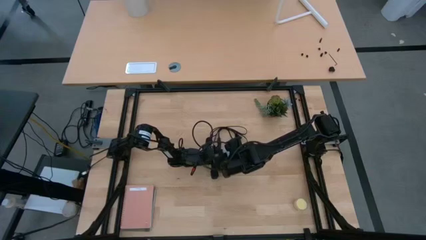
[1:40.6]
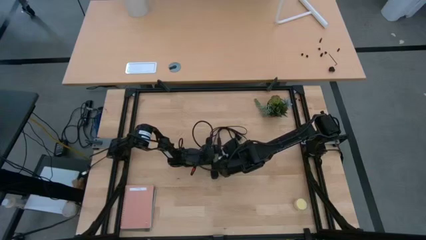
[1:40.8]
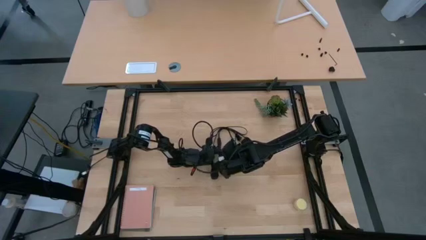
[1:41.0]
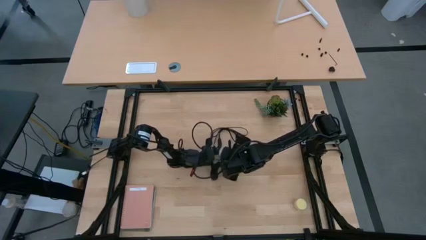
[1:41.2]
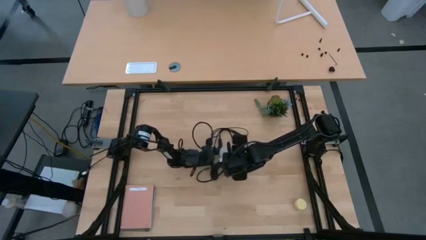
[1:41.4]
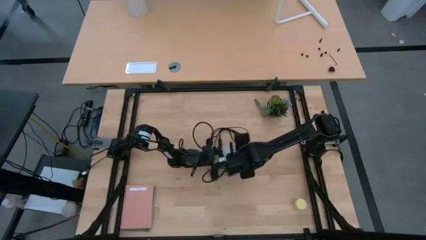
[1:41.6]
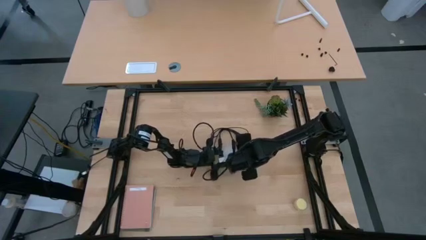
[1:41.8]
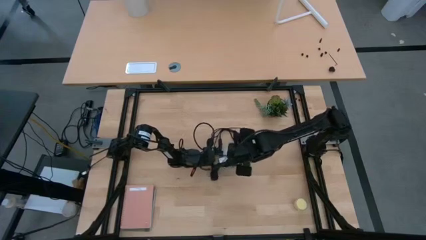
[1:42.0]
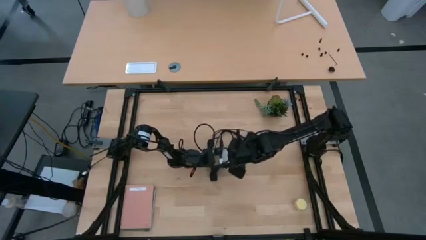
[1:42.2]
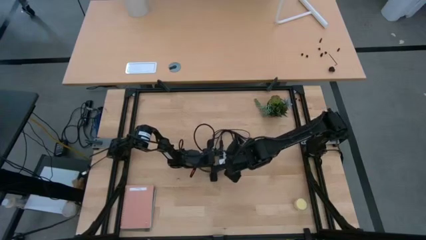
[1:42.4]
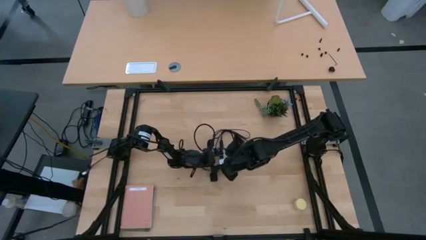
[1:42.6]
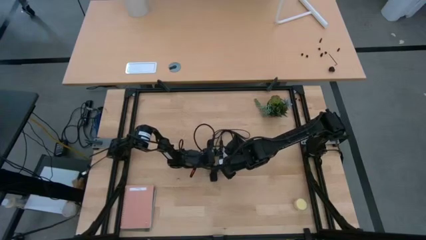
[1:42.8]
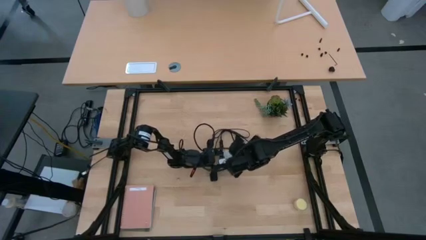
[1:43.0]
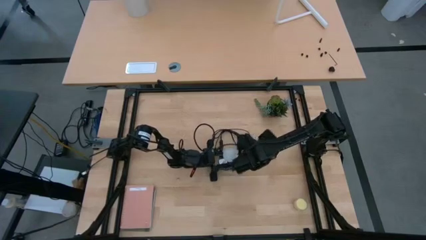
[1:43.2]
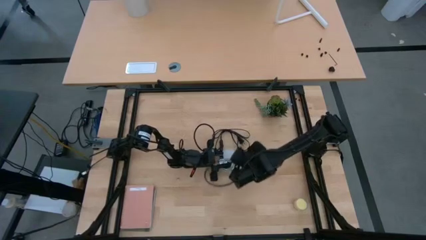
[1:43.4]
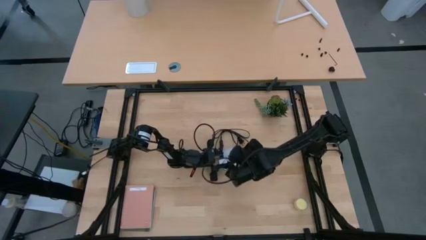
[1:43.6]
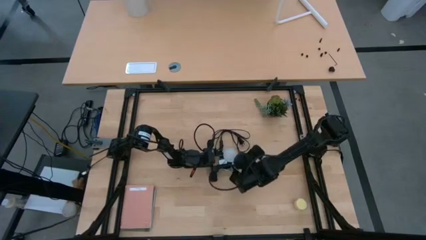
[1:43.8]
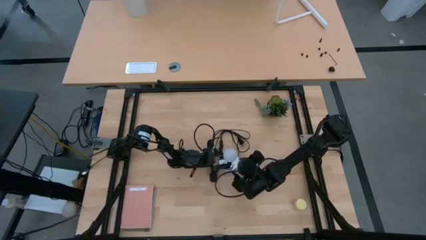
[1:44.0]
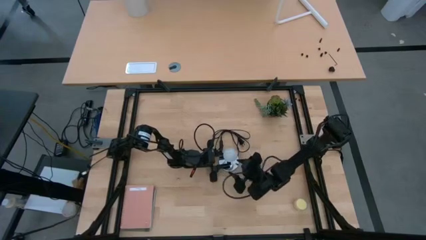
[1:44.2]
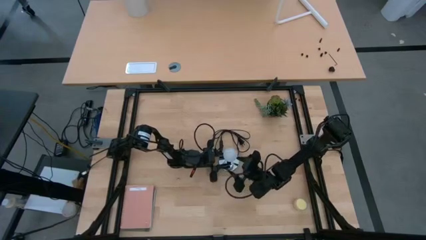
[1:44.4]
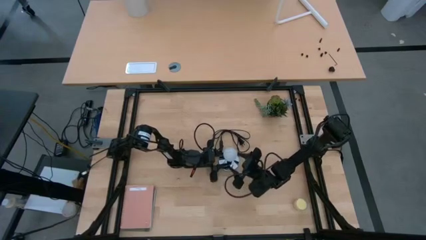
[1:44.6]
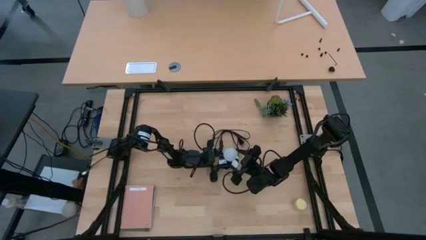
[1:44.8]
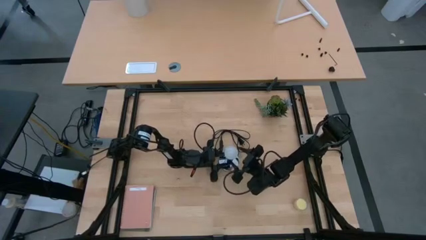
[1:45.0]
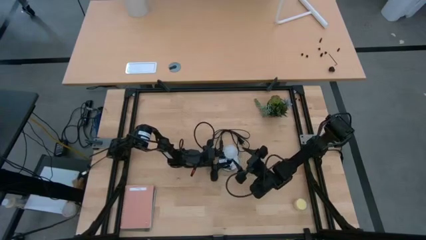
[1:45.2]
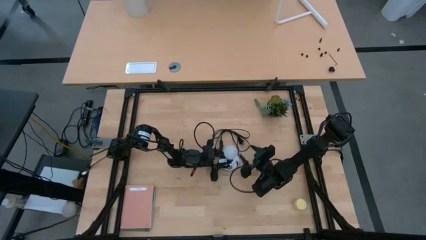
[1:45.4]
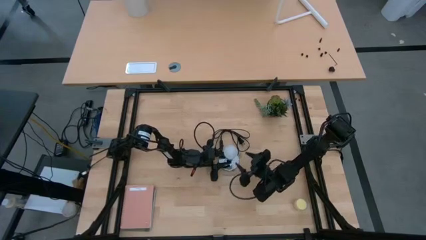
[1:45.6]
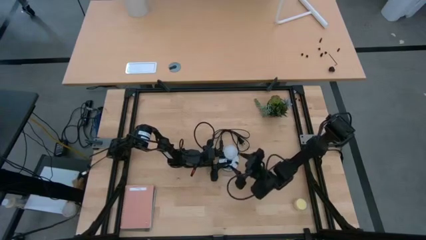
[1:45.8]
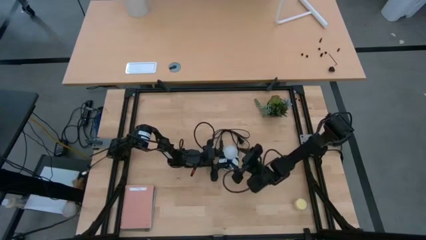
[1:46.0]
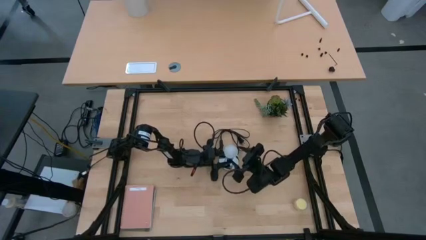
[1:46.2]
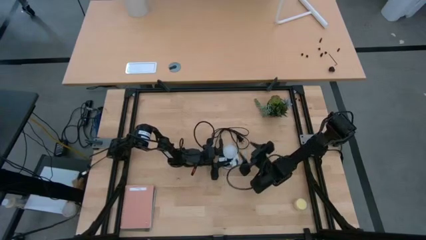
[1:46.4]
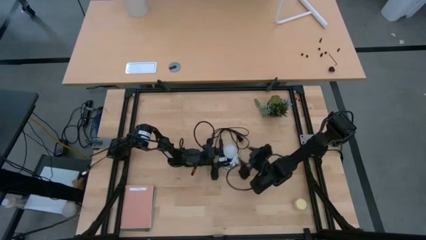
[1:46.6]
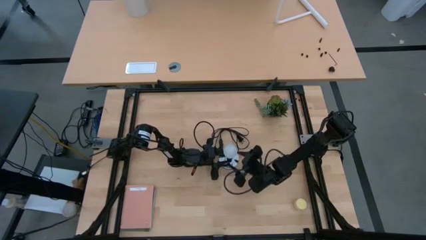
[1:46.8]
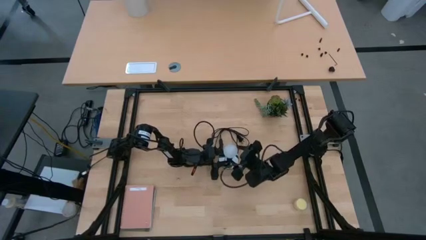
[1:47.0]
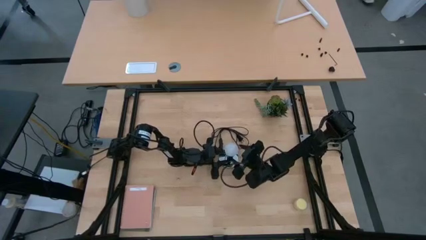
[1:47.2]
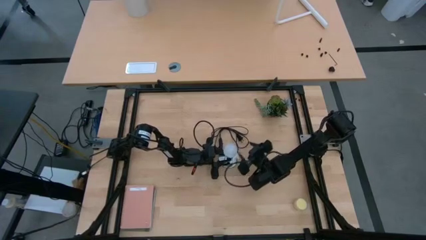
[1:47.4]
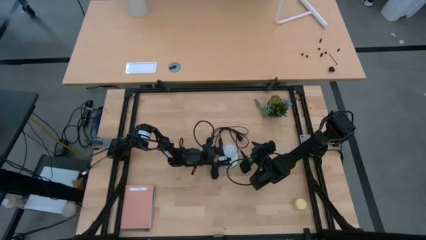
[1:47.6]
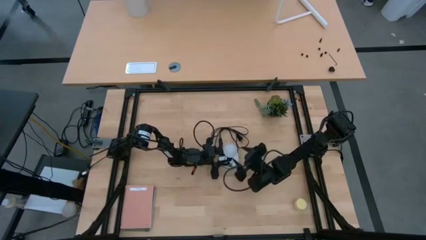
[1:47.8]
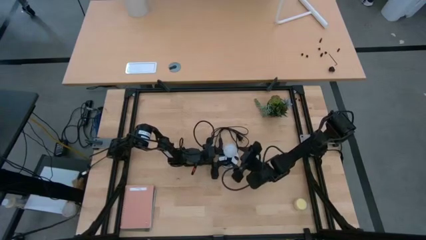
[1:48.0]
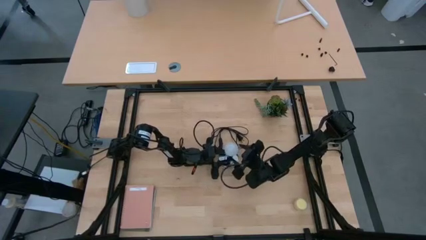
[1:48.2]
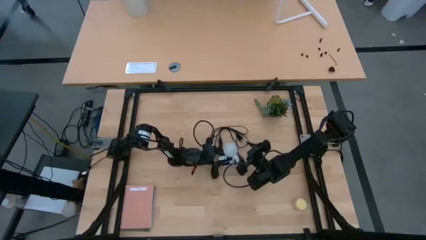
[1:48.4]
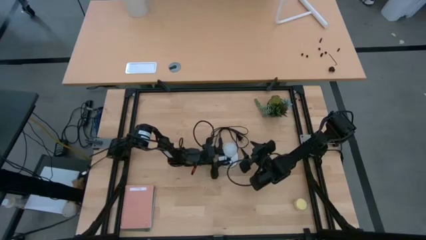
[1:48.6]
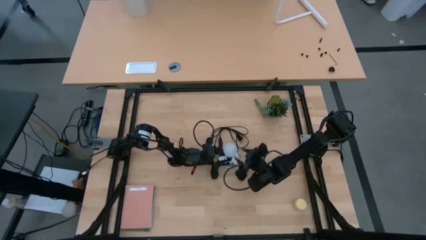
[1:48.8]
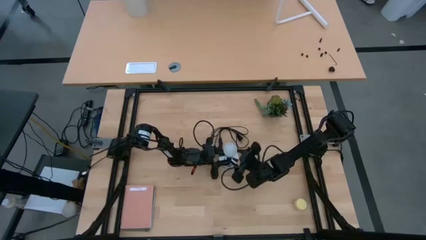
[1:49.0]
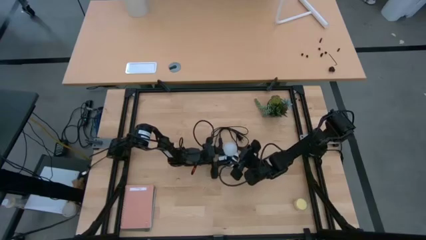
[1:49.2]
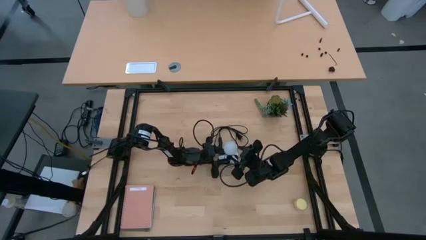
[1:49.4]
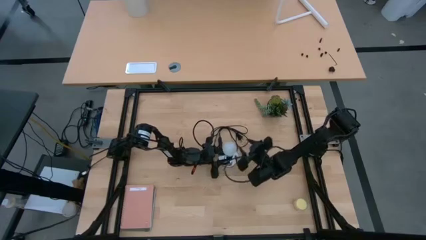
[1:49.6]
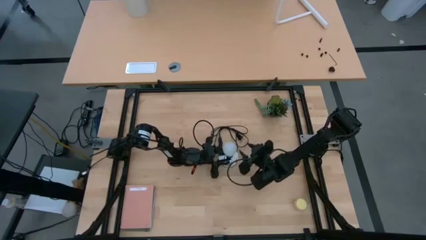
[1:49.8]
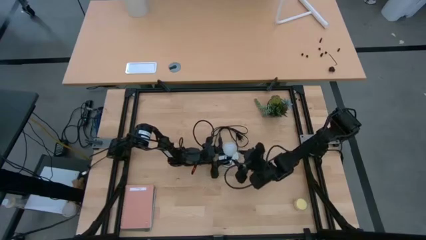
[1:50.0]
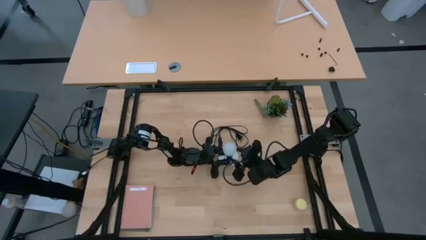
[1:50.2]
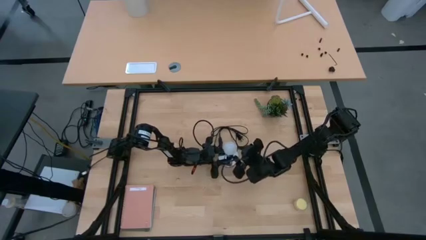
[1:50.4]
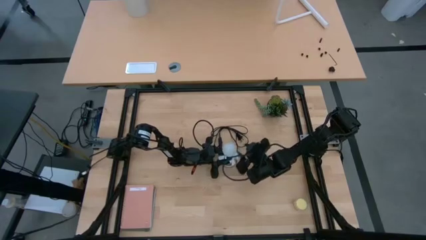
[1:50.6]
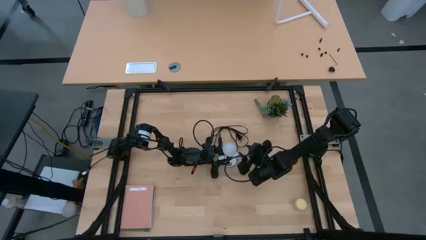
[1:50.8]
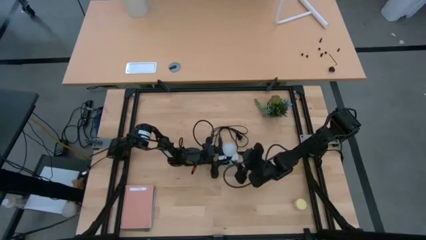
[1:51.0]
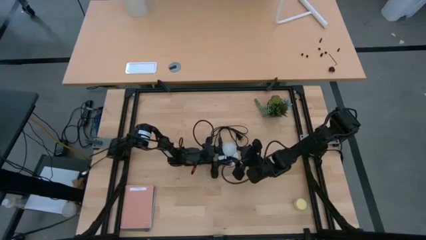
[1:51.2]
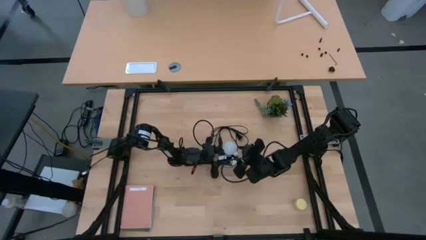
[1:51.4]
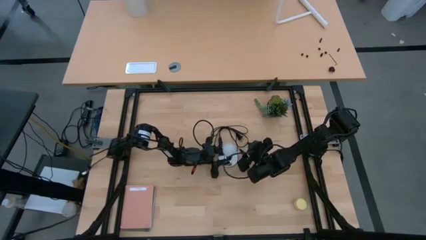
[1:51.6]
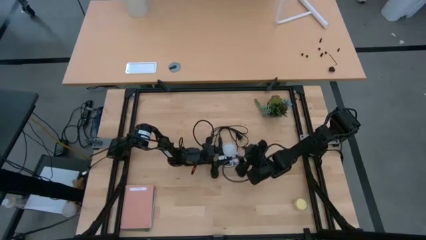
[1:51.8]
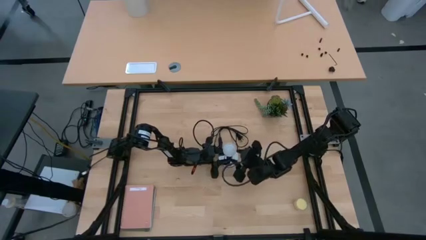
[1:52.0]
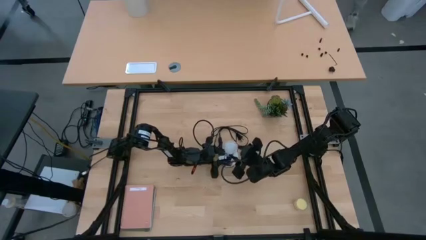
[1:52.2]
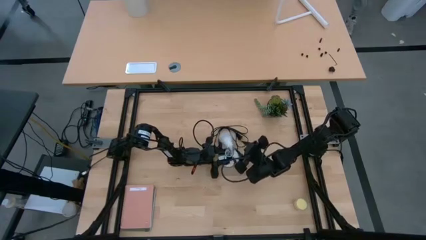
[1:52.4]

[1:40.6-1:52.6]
Task: Screw lightbulb
Remove the lightbulb from the lamp

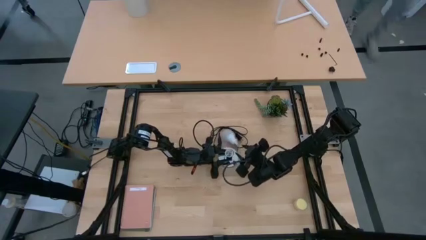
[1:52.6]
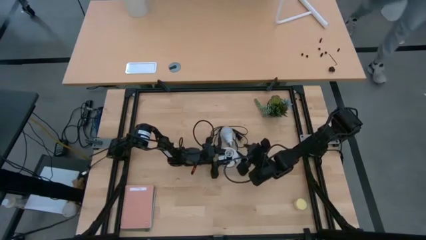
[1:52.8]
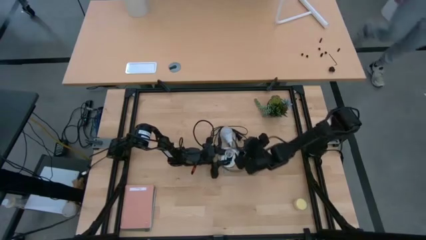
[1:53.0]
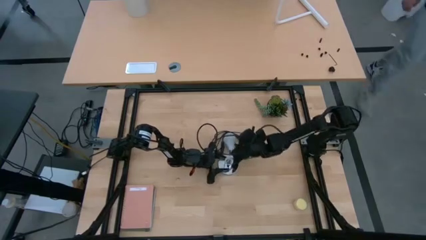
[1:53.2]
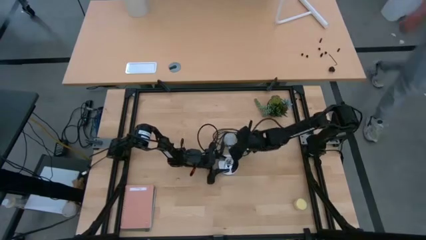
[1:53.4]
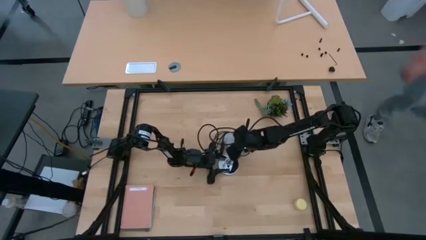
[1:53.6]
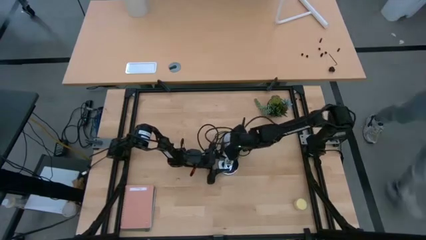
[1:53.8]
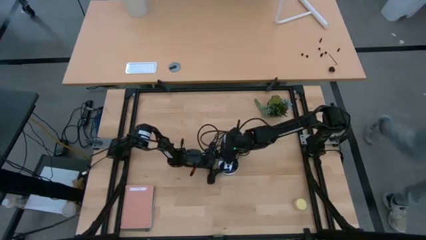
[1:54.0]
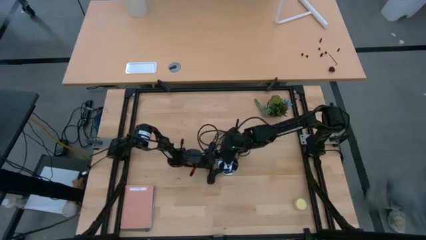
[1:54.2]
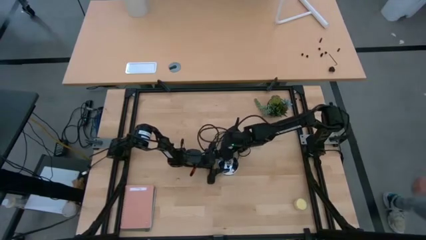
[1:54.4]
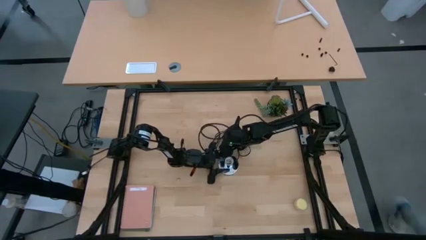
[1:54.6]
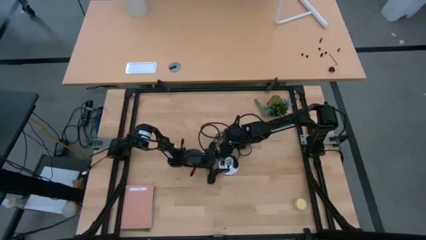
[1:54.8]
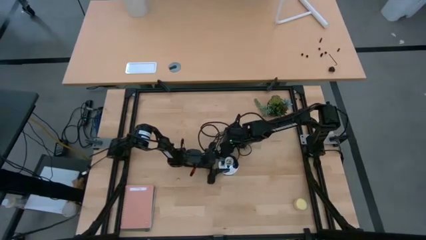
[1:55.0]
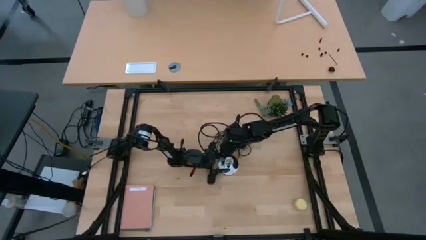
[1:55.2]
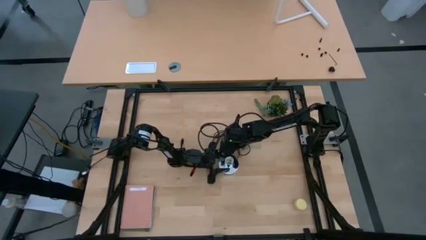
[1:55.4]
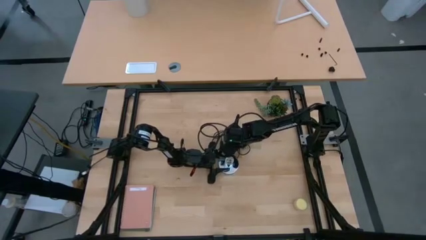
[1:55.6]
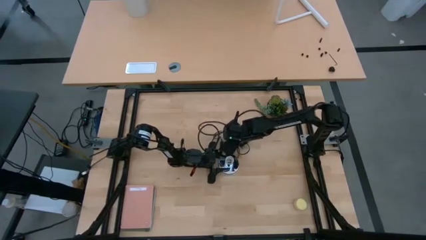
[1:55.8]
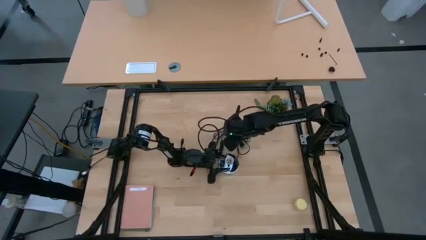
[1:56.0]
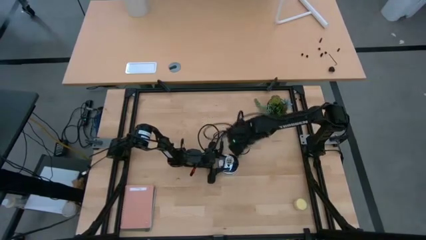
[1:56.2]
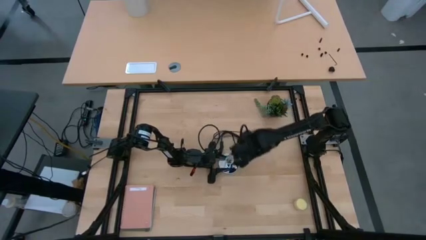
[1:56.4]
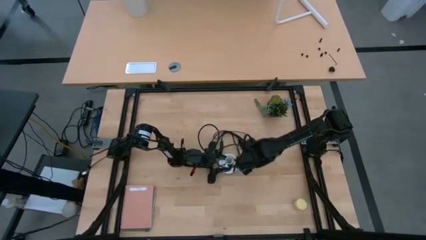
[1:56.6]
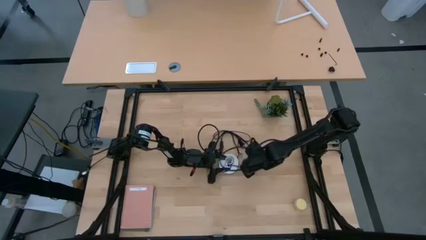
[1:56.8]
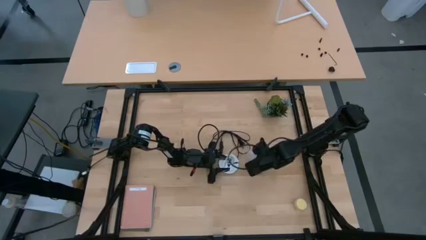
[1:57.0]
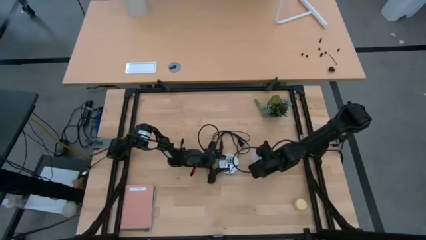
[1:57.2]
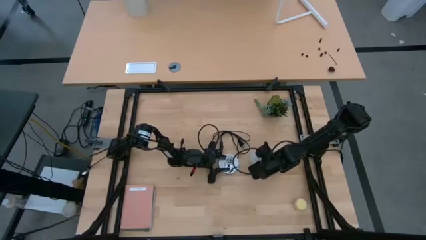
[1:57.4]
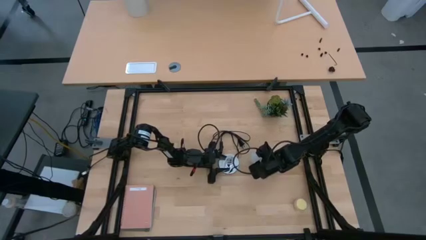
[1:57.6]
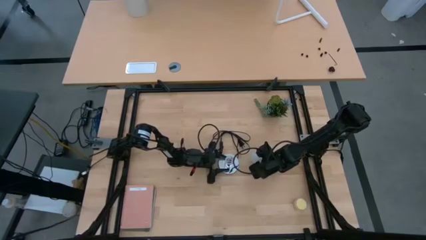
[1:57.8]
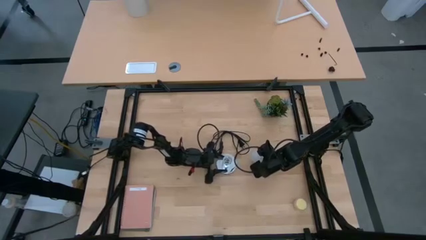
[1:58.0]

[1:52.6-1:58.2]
Move the lightbulb to the middle right of the table
